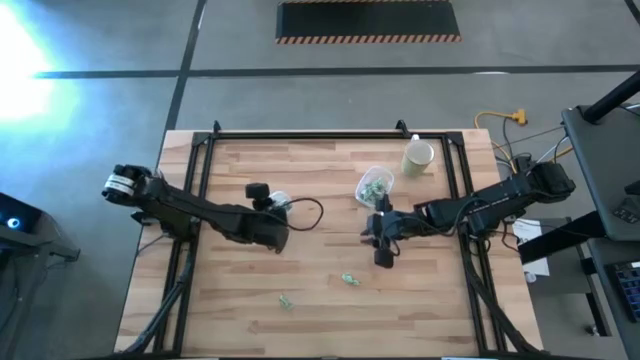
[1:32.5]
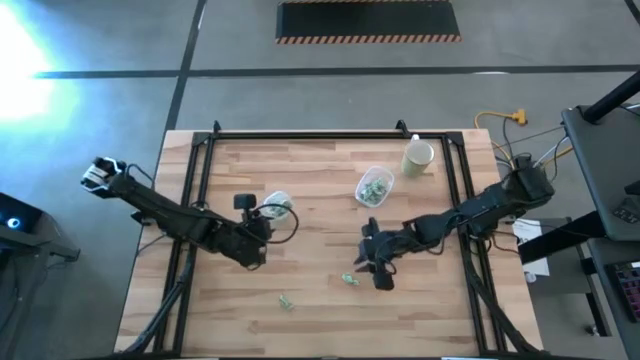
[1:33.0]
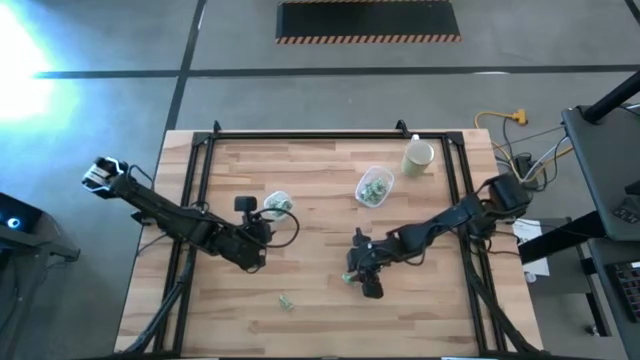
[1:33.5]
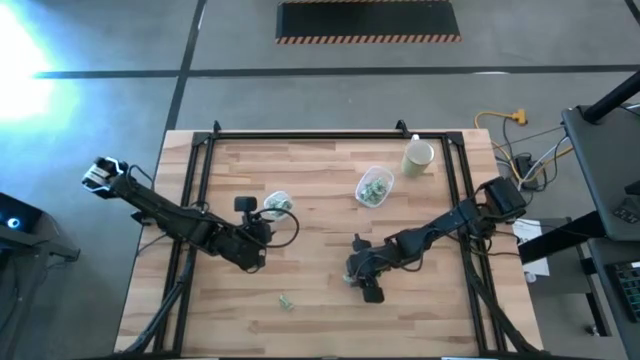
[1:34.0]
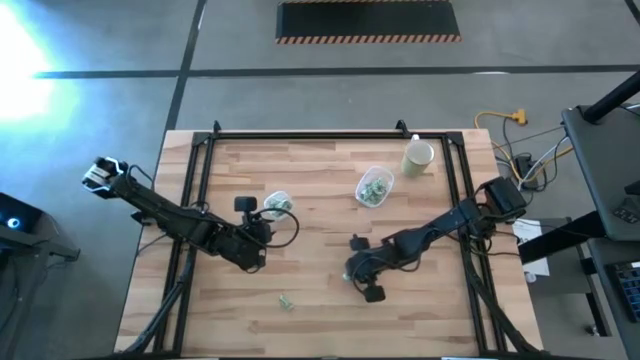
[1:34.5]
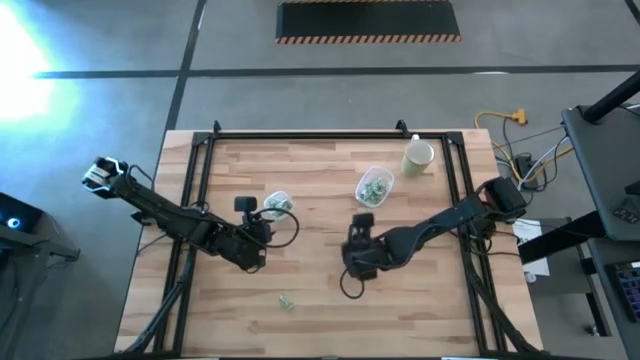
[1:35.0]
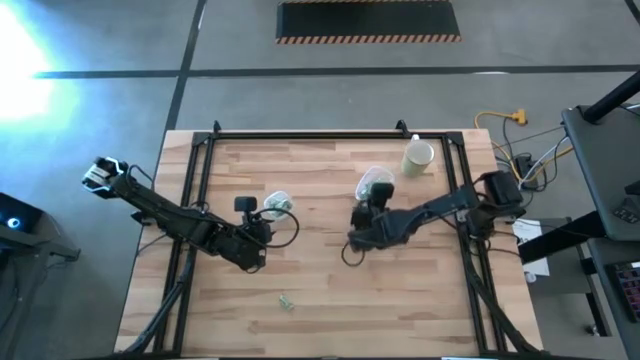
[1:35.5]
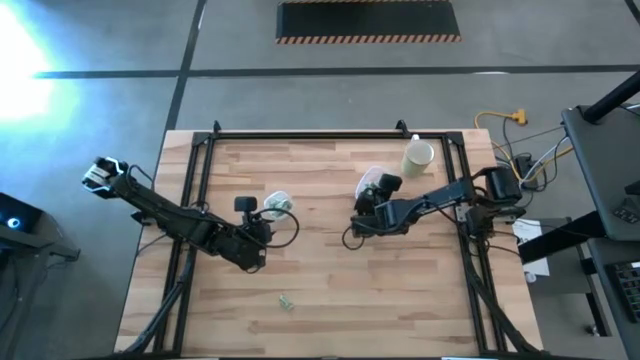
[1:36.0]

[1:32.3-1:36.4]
Task: Pick and place items into bin
Put the stevia packet into the right transparent bin

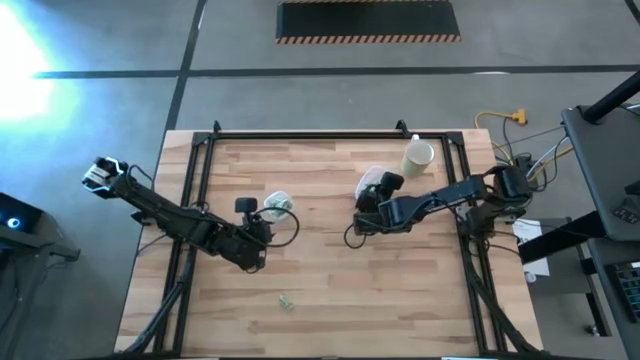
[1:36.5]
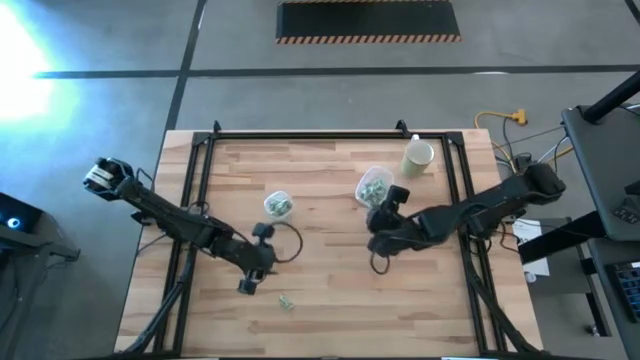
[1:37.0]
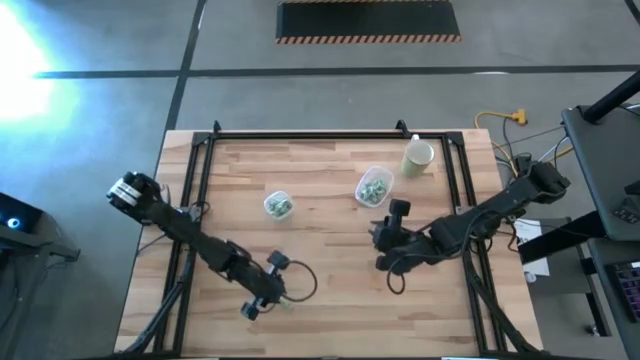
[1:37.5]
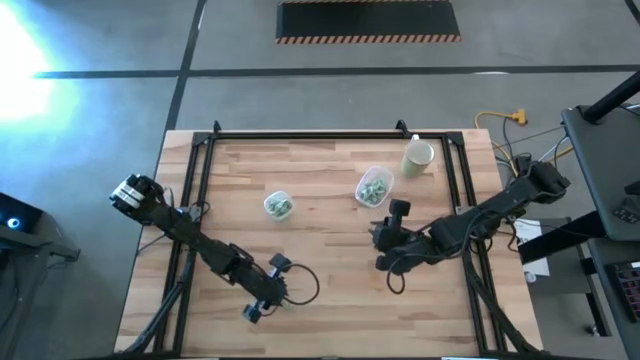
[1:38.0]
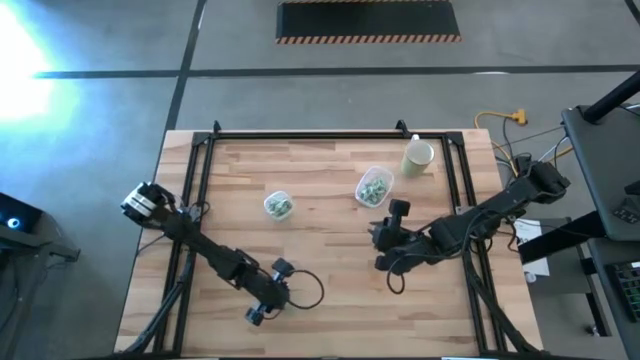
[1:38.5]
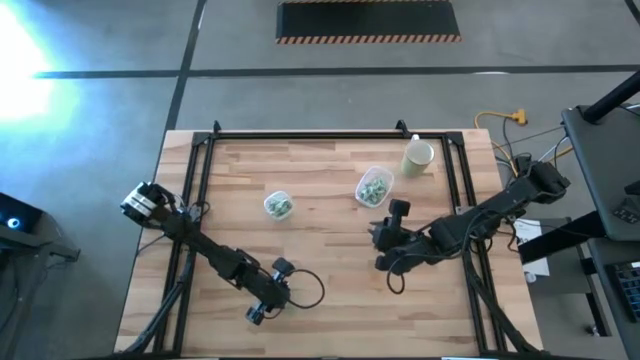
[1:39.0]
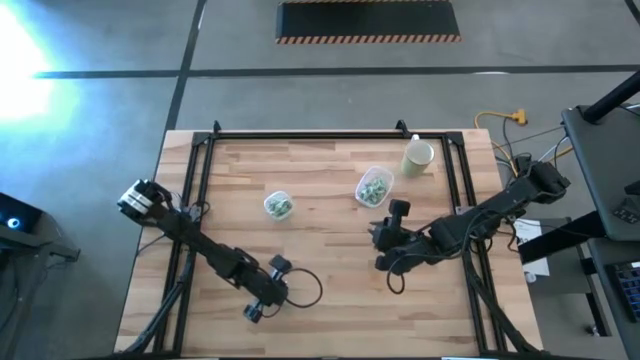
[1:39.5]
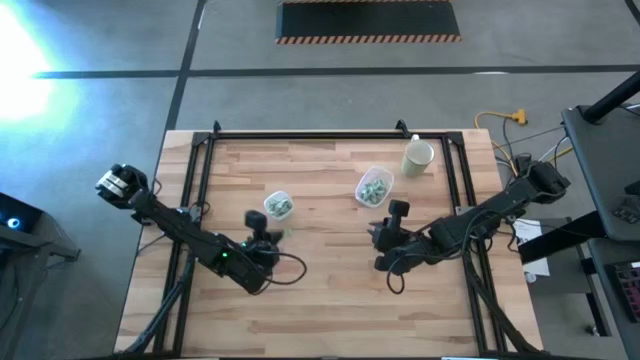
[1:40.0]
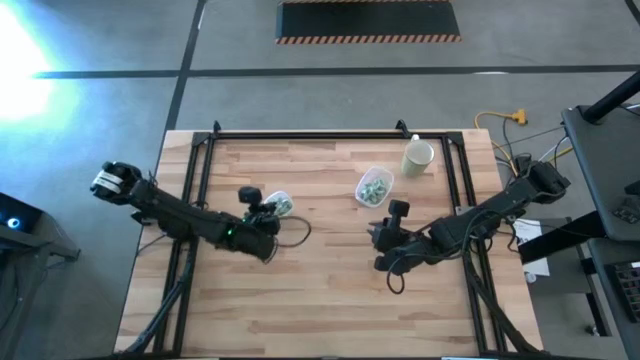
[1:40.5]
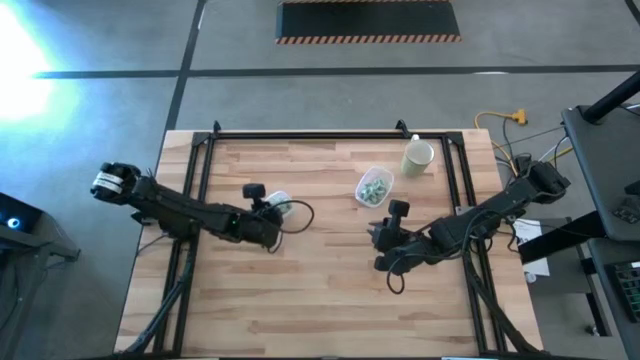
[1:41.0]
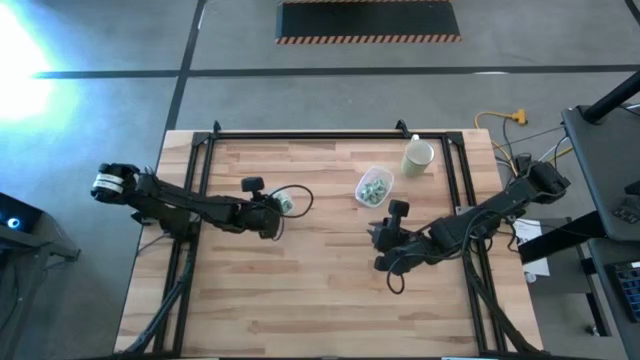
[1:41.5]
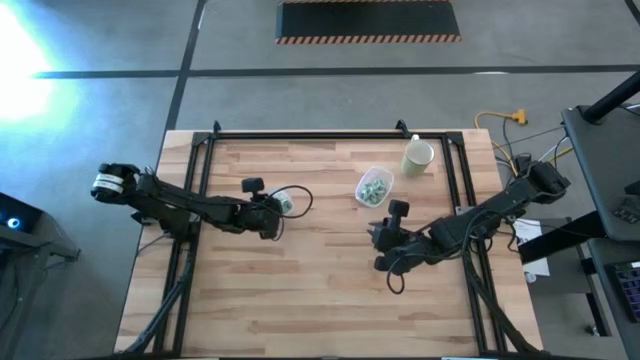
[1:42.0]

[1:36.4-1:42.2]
Put the stevia packet into the left transparent bin

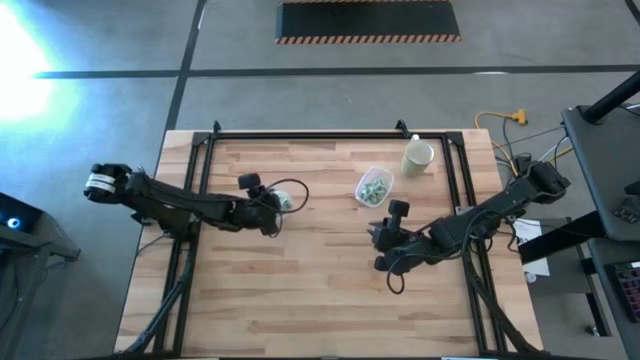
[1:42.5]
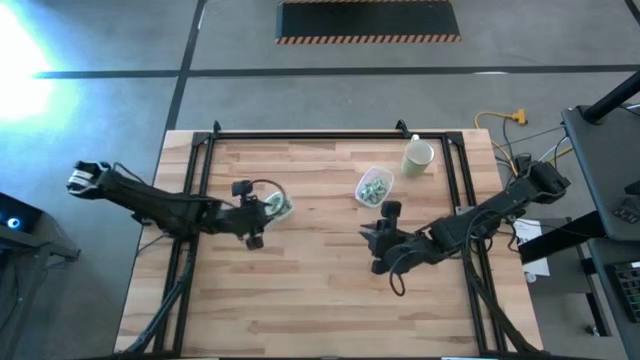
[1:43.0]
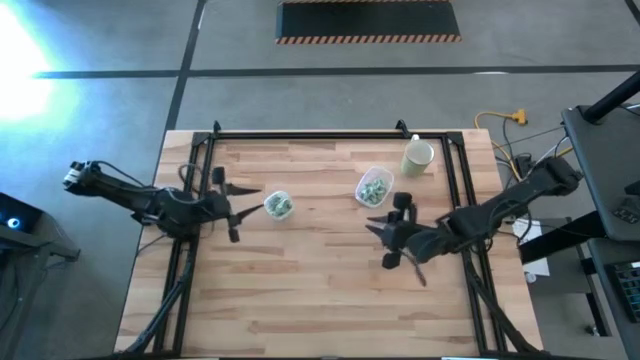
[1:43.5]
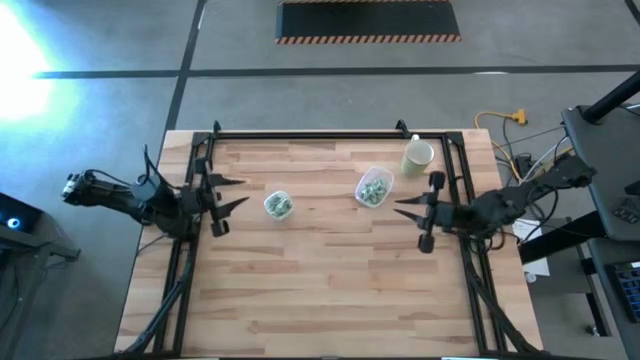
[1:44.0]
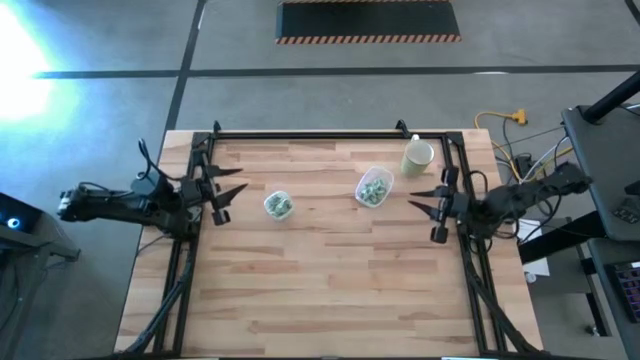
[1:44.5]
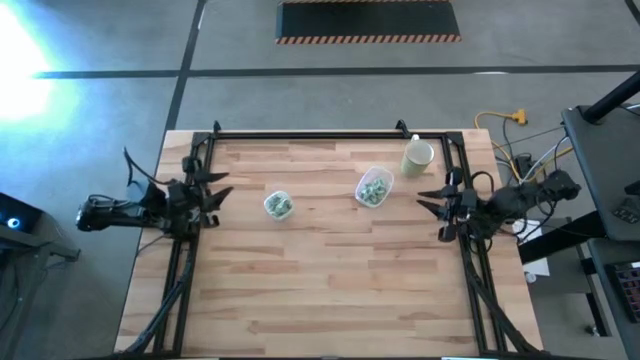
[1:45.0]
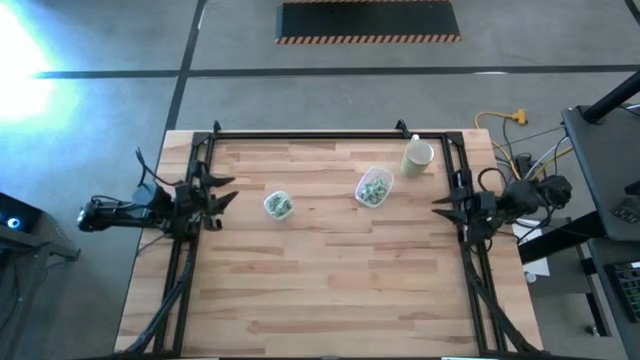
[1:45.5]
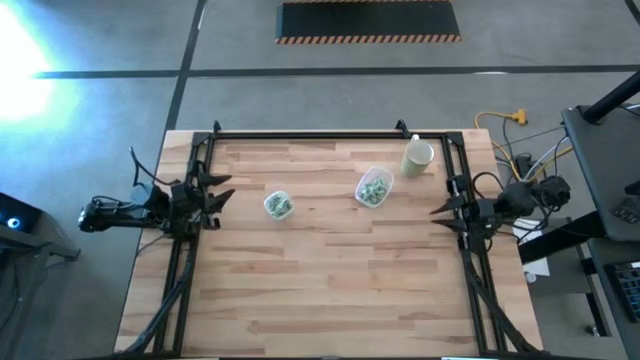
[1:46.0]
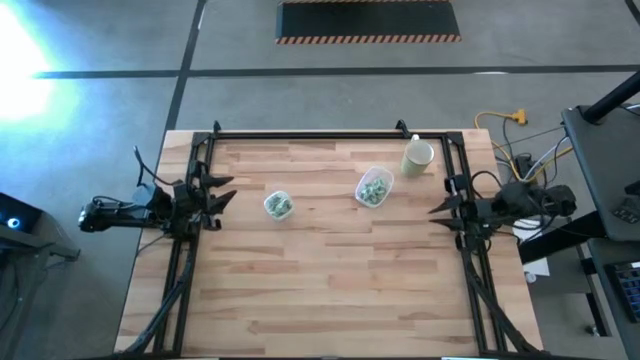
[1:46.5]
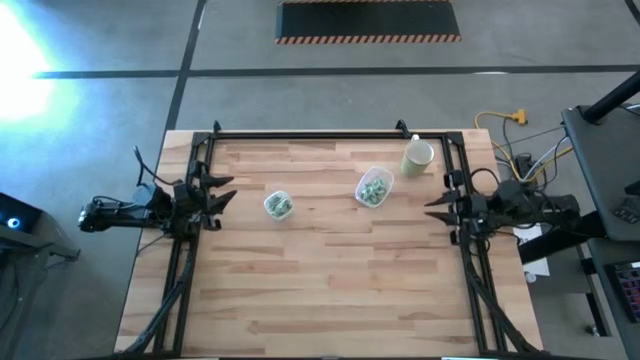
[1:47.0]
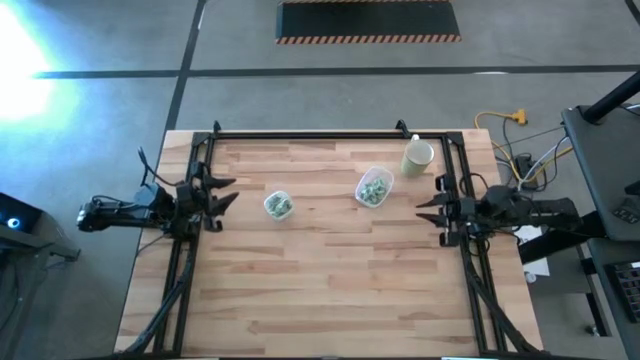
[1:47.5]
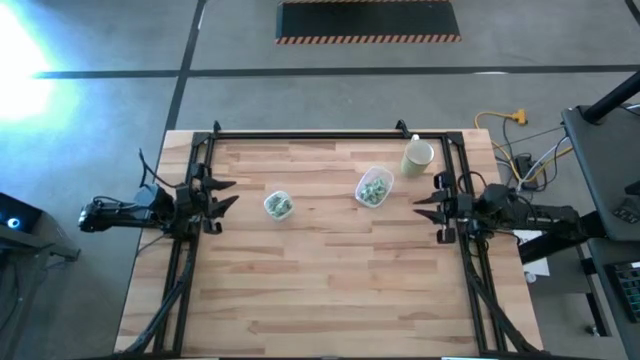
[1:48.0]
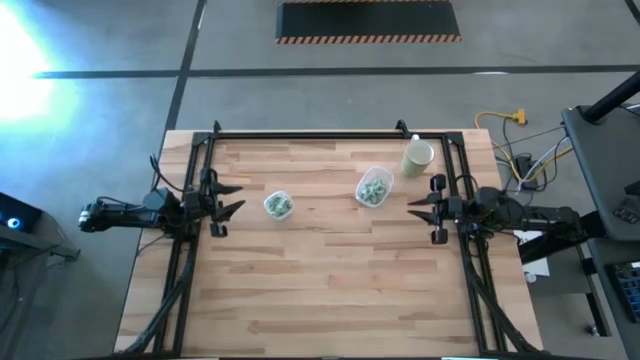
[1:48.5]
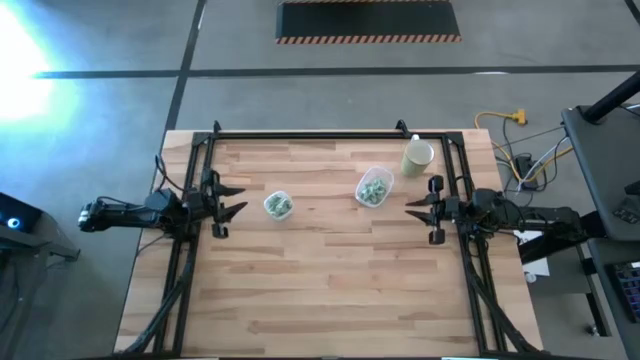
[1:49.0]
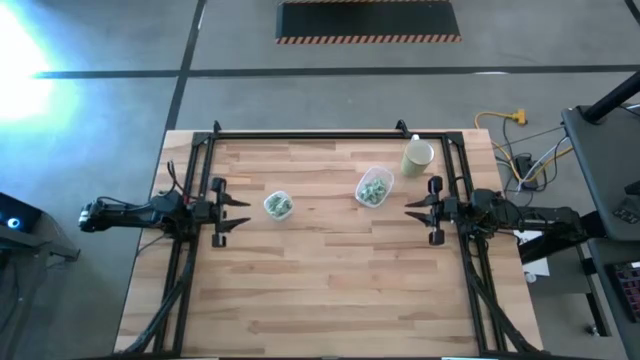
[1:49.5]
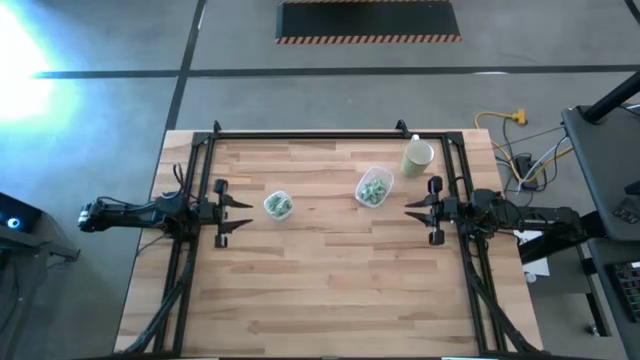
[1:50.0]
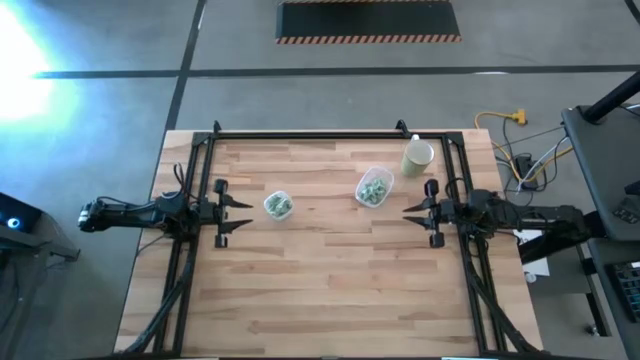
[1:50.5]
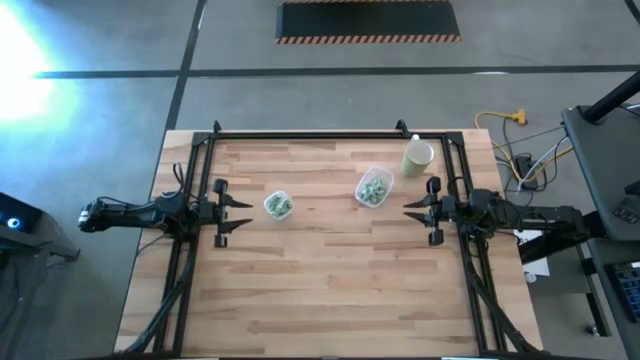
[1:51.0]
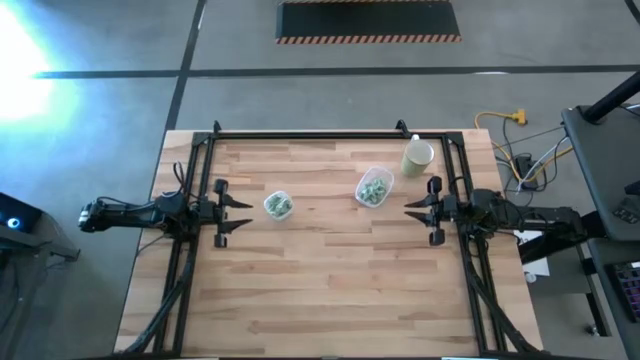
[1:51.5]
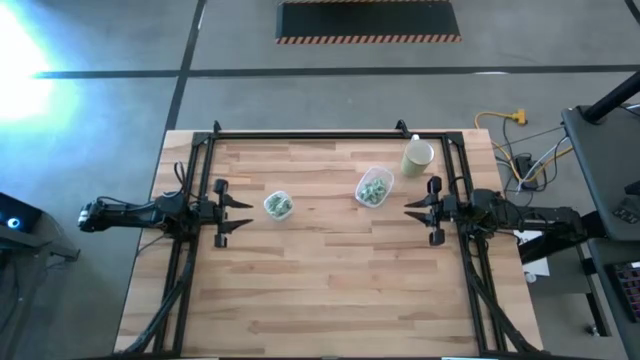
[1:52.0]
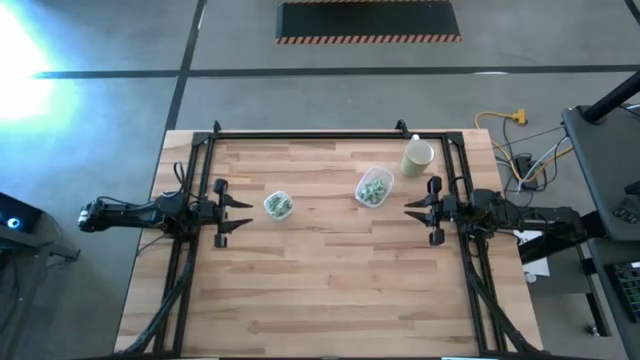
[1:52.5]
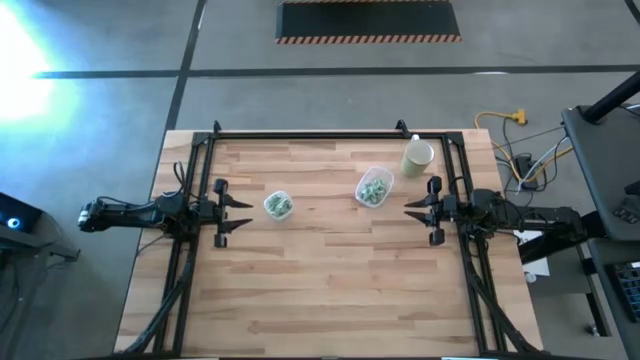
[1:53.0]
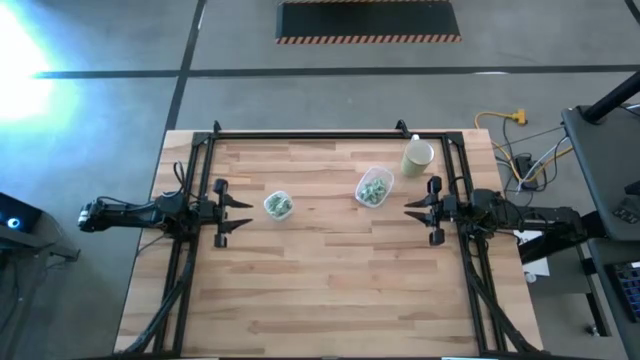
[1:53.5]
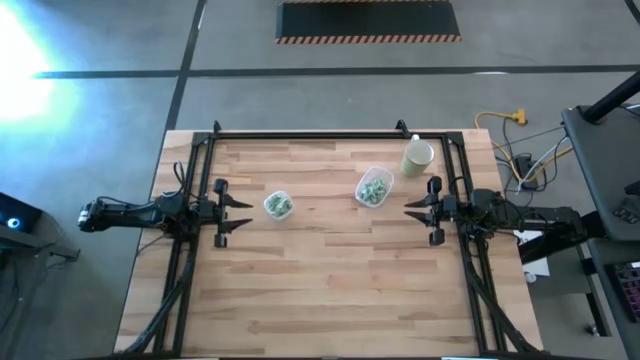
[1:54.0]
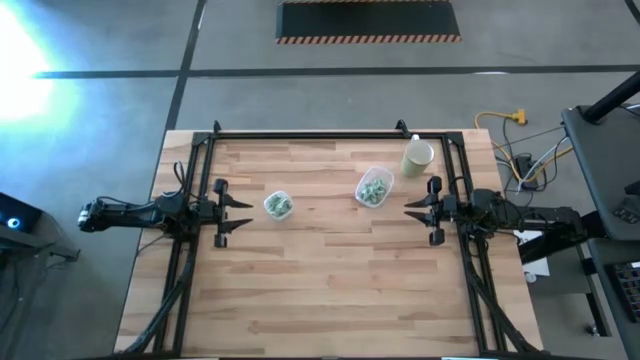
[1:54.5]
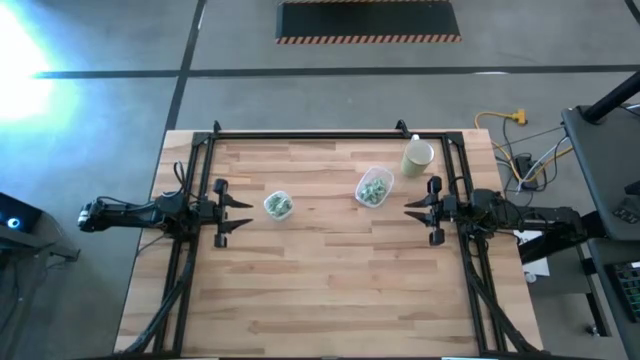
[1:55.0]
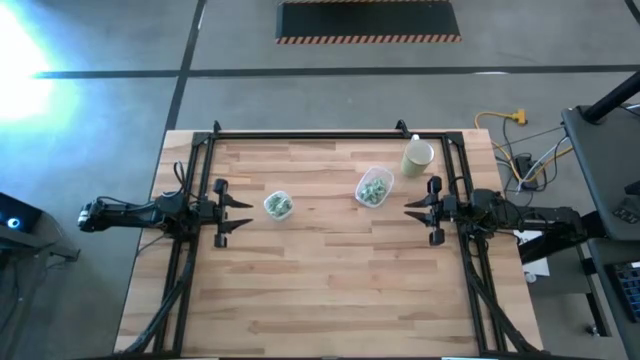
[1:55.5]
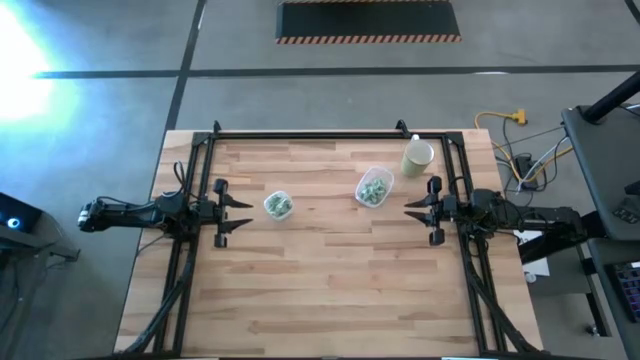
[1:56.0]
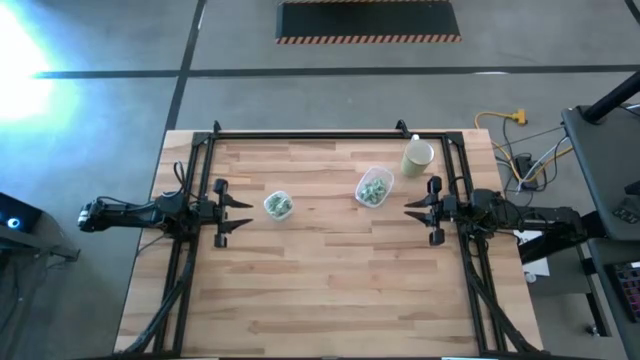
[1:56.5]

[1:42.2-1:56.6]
Return to Home Position
